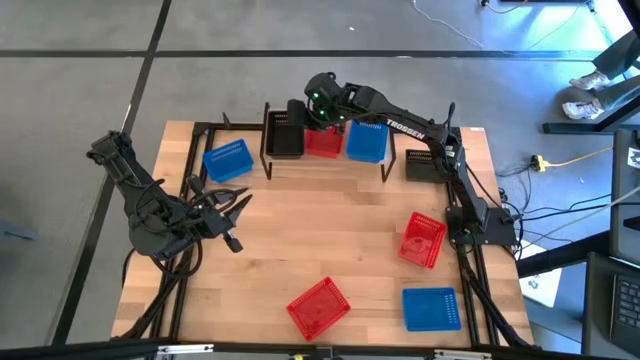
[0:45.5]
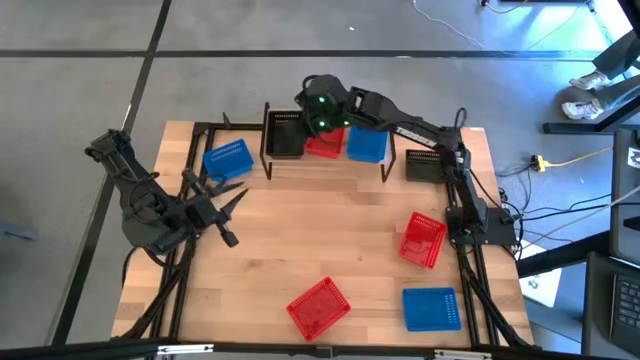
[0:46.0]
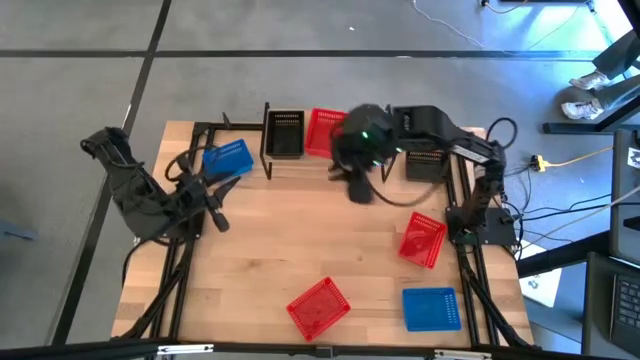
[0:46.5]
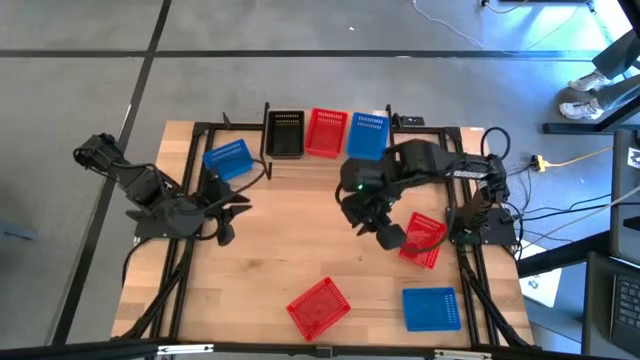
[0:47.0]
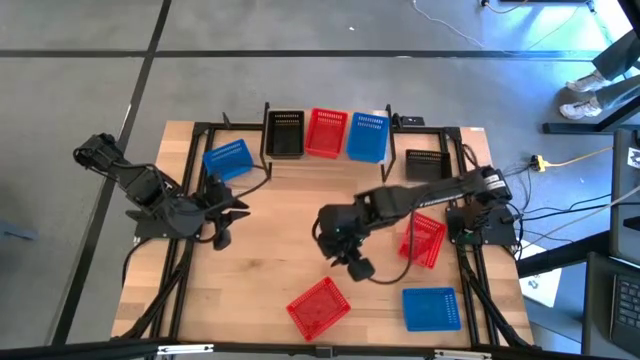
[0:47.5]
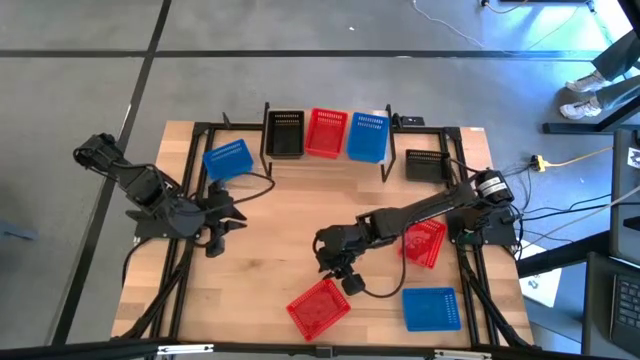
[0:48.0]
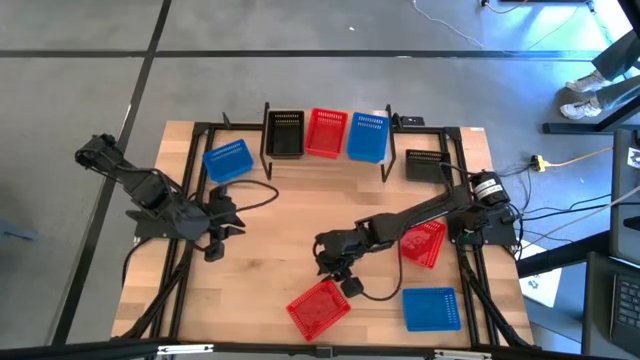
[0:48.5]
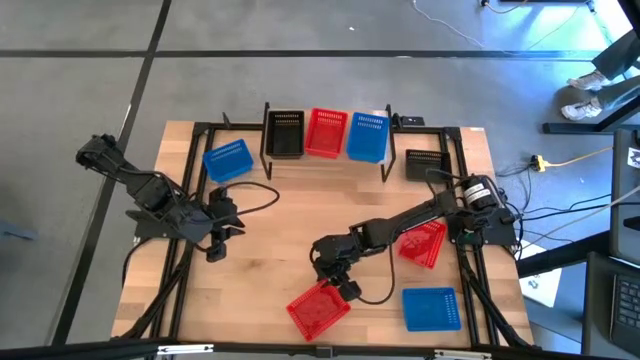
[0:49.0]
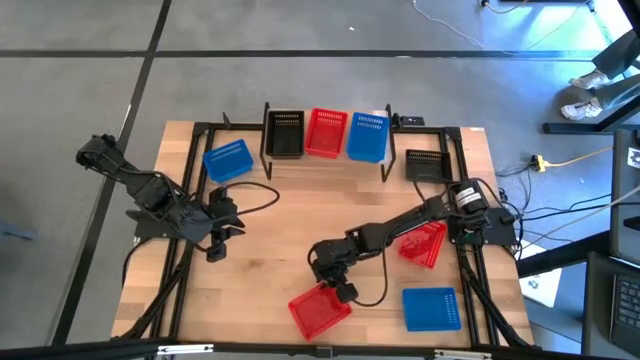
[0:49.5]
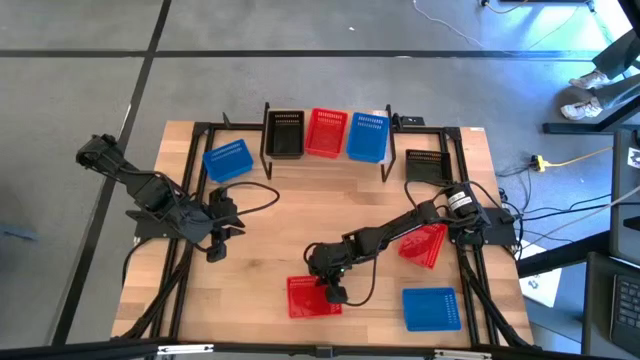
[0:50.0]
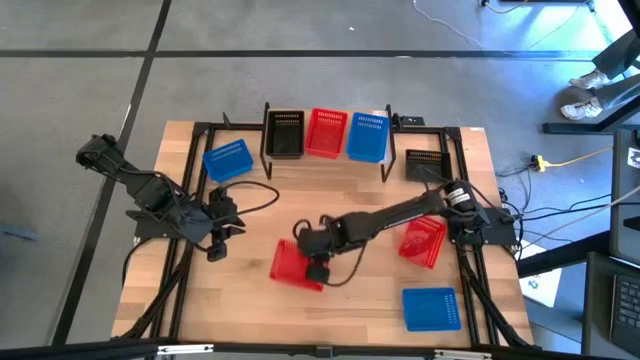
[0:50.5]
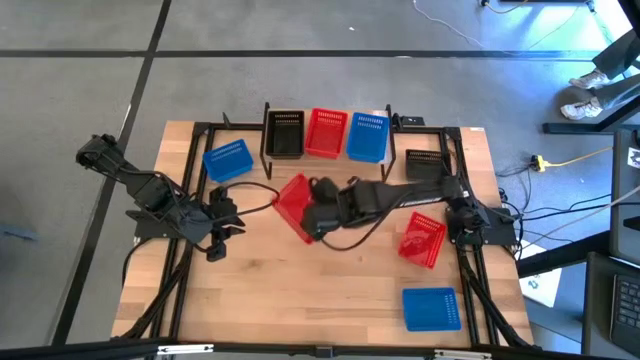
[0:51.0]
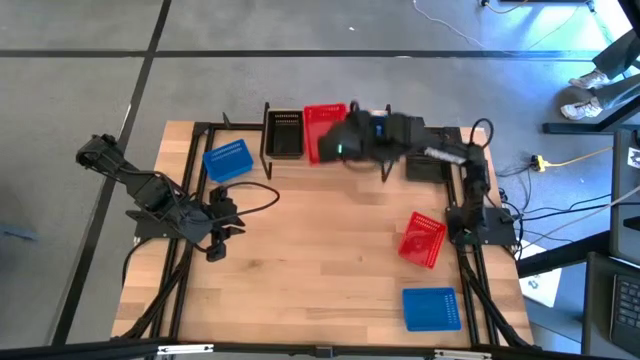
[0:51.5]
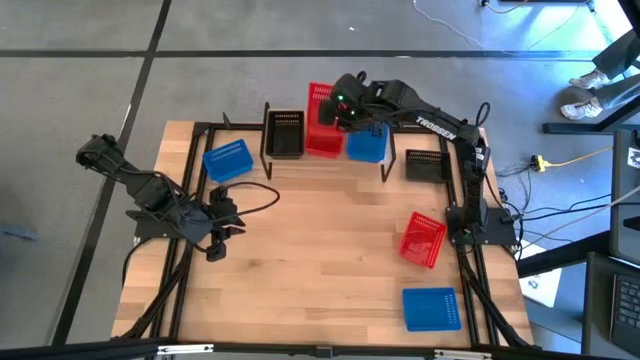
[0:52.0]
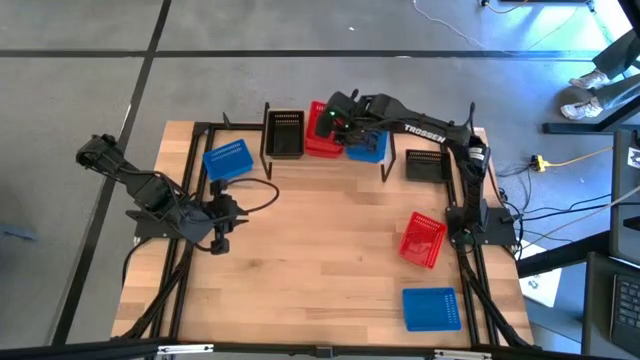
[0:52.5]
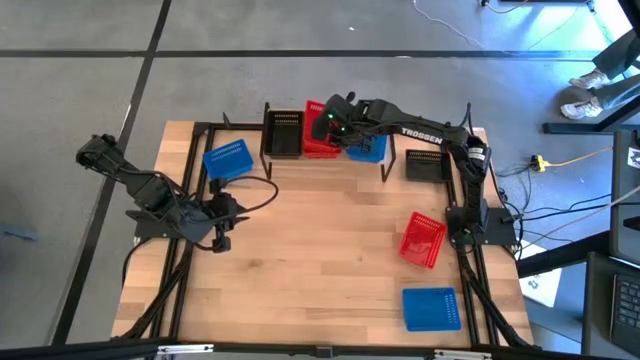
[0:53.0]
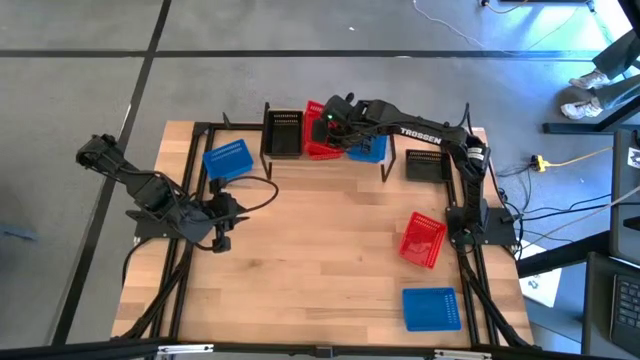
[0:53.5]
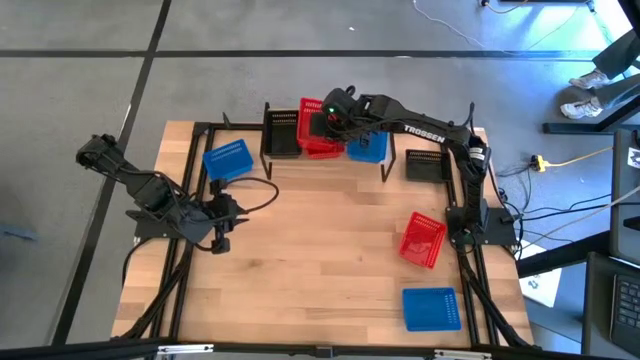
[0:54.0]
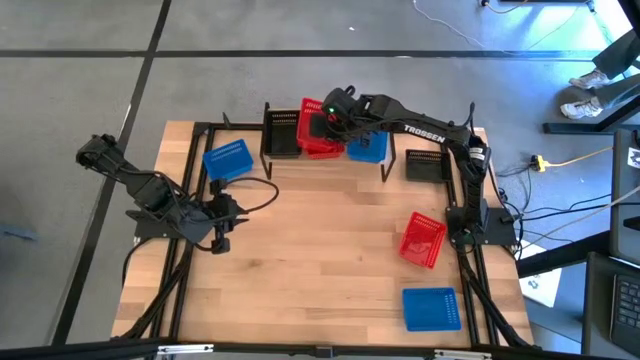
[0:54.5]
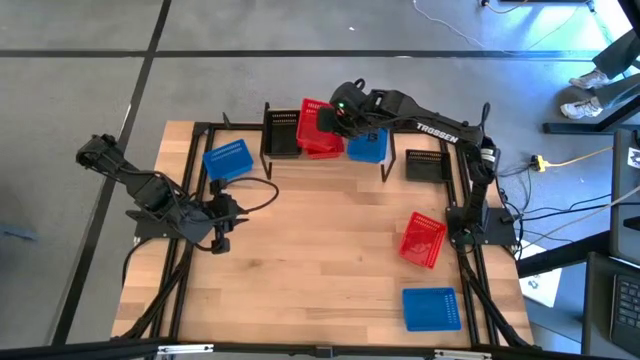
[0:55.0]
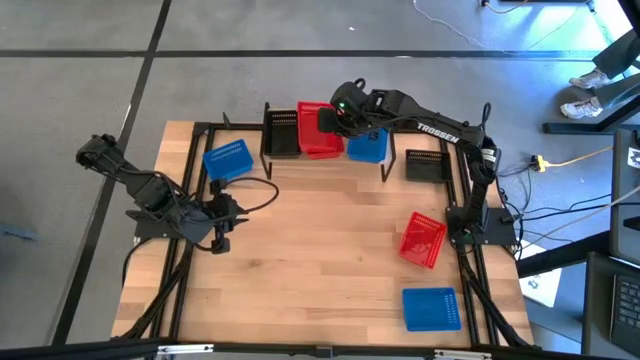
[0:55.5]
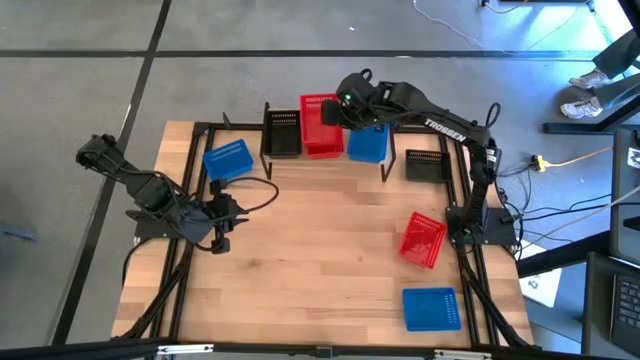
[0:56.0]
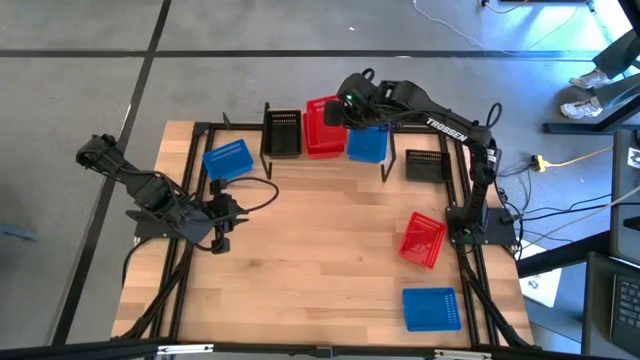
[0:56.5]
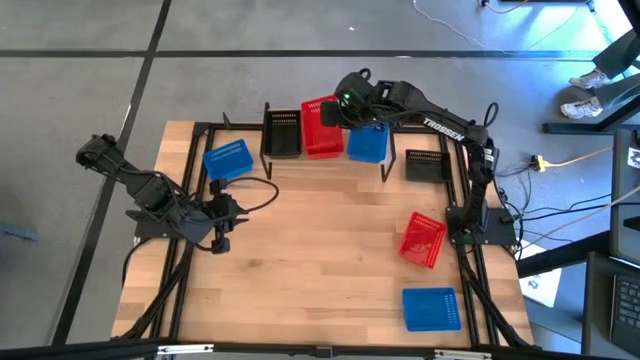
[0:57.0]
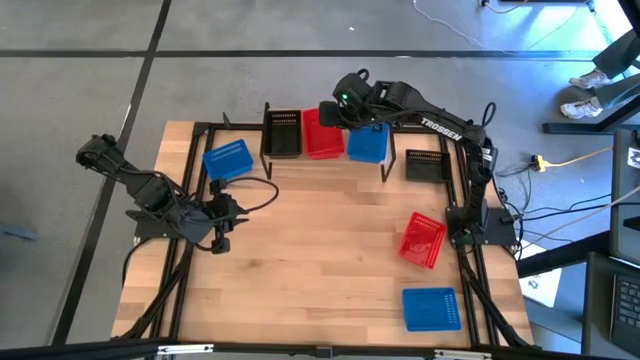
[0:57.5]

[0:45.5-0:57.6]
Task: Stack baskets on shelf by color
Stack the bottom red bin on the red bin on the shelf

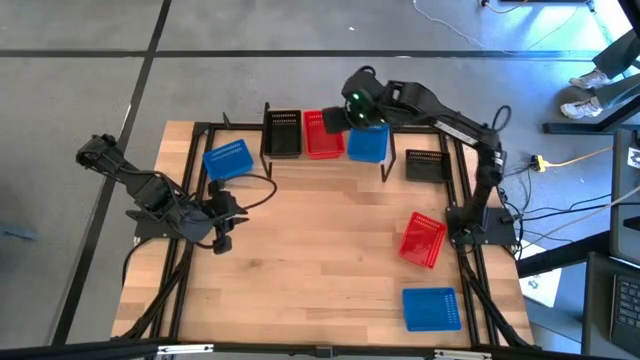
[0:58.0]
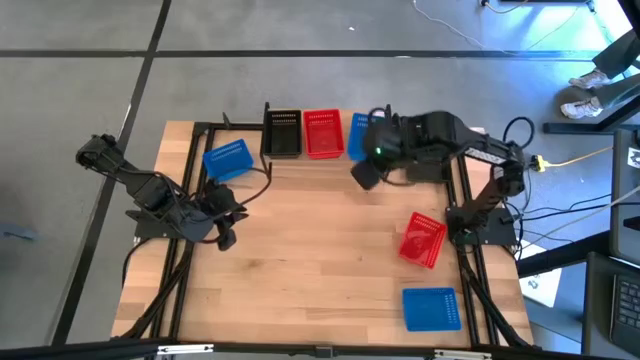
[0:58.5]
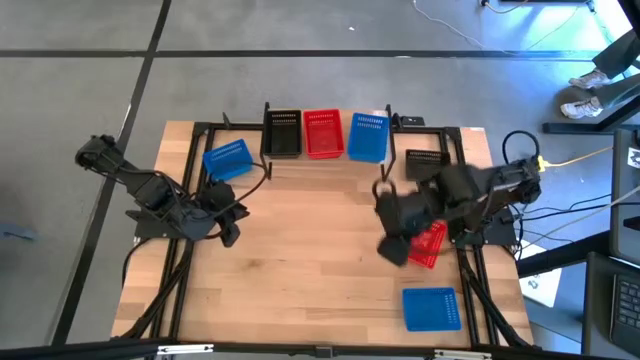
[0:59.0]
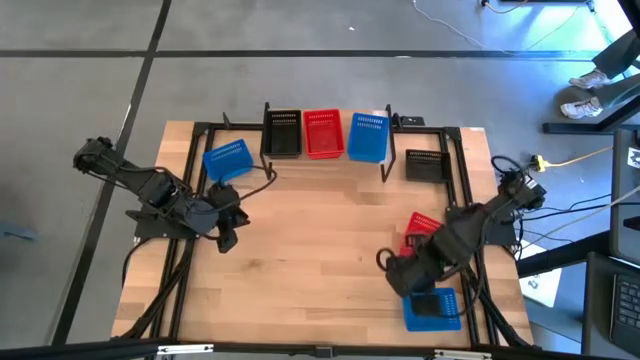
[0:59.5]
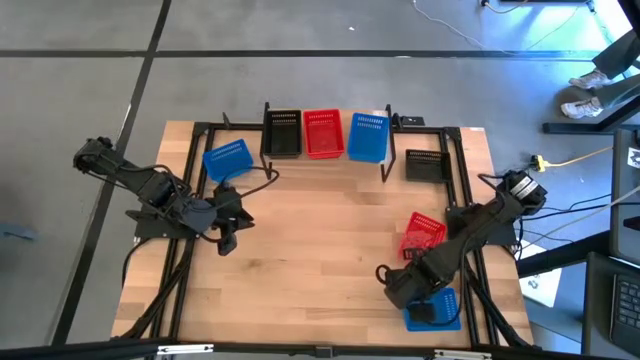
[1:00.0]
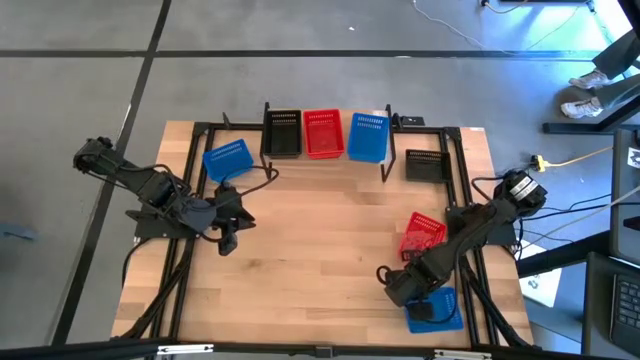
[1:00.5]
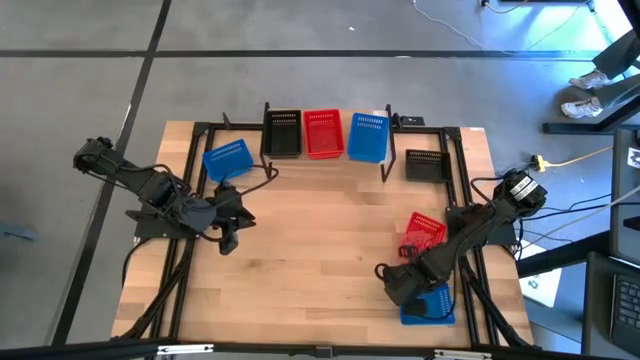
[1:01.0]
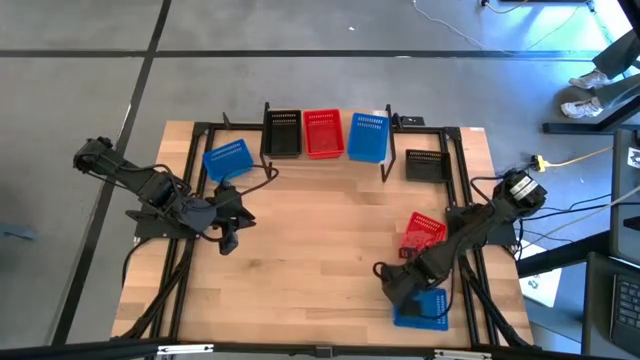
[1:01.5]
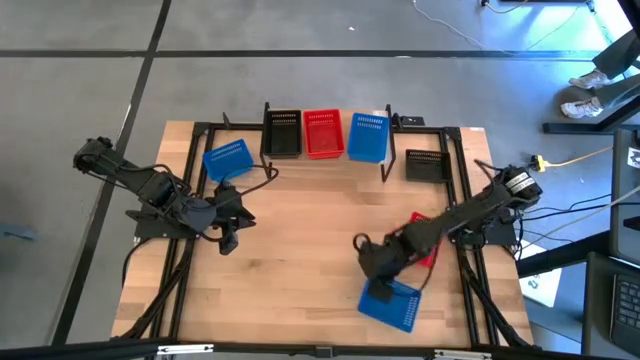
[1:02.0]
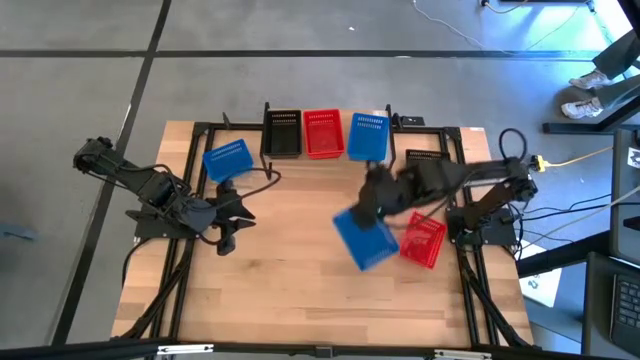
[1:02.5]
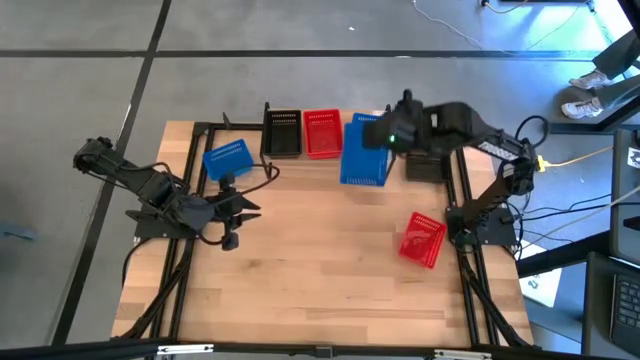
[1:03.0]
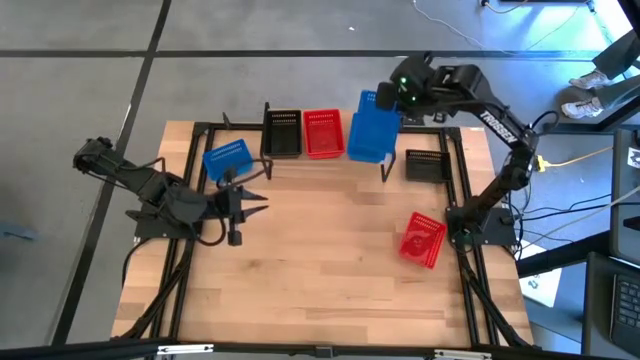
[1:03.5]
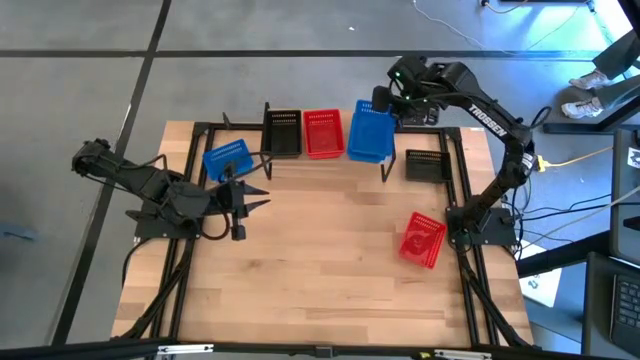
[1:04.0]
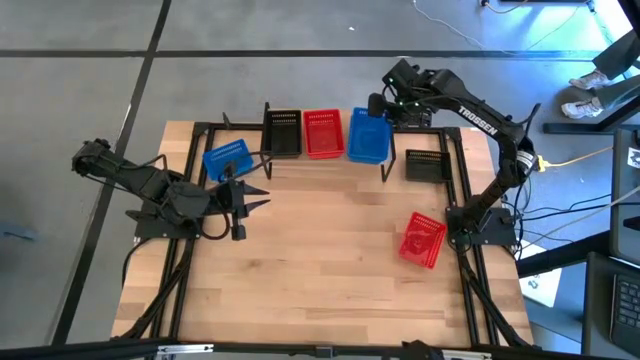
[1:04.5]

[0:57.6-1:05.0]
Stack the bottom blue bin on the blue bin on the shelf

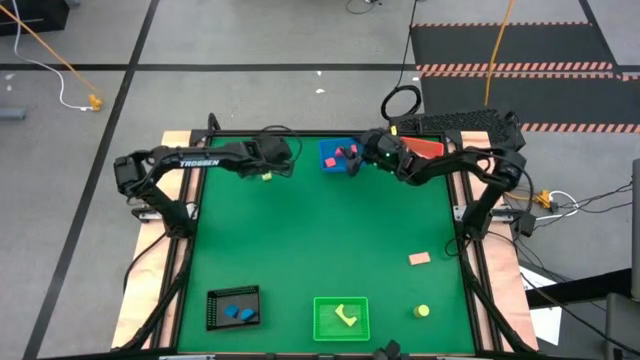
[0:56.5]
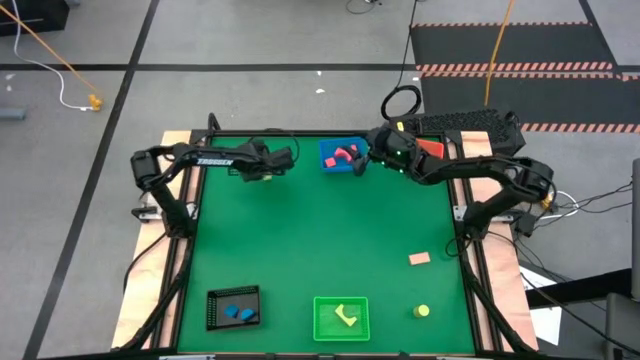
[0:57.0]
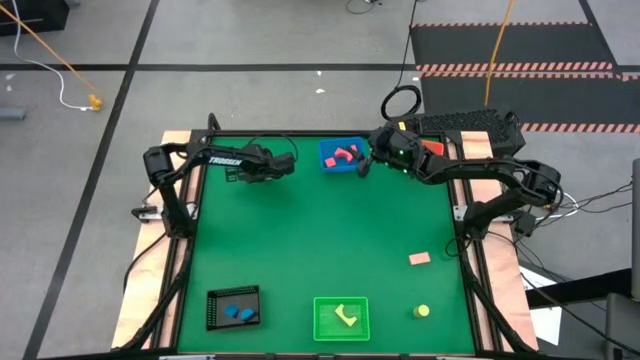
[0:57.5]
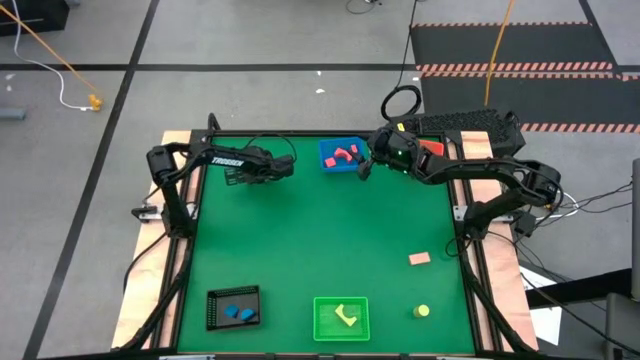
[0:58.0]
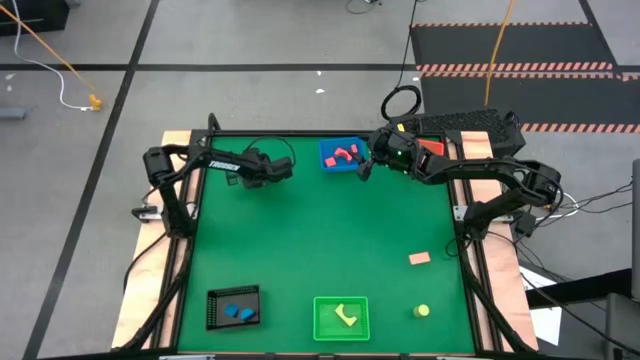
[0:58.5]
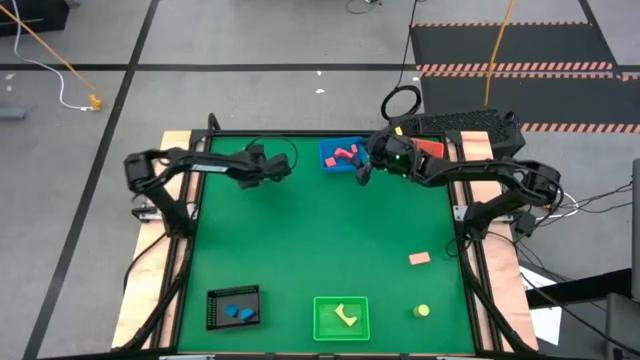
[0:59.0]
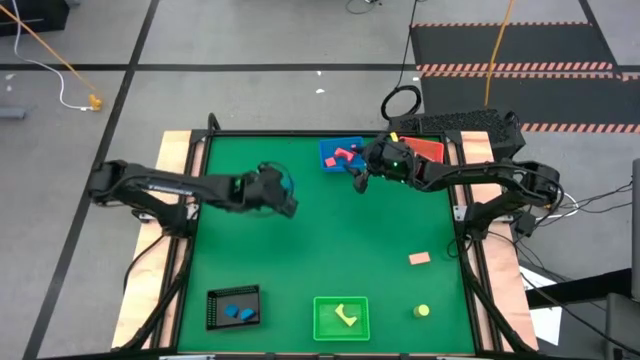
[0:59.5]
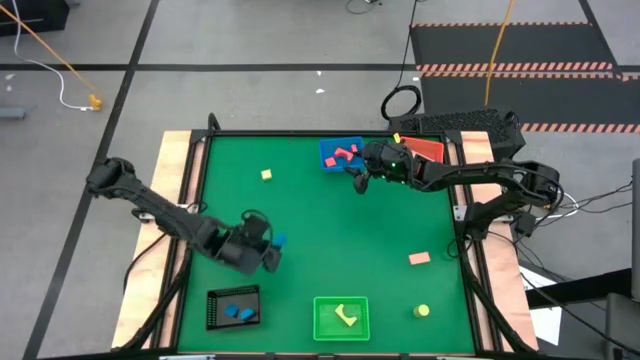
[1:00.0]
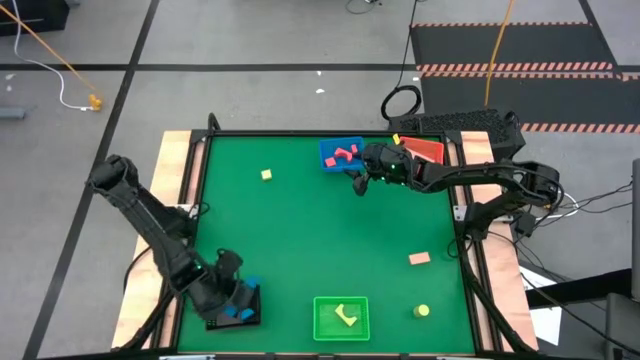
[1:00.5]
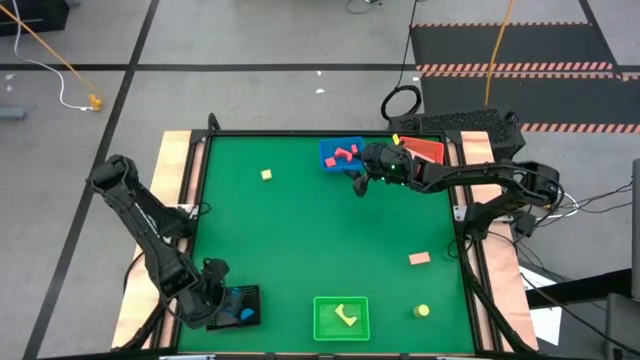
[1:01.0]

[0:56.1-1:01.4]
Task: Sort & place blocks by color
Put the blue block into the black bin
